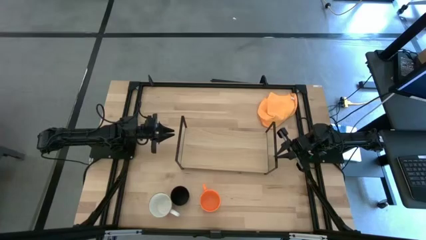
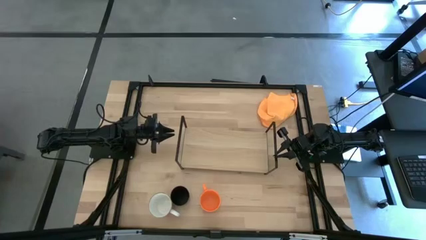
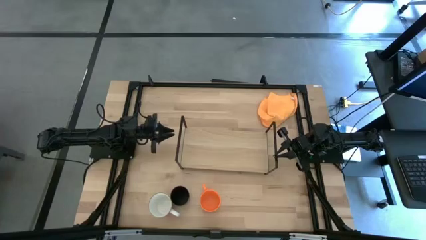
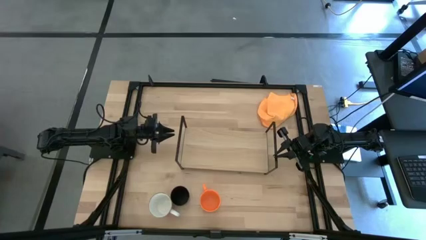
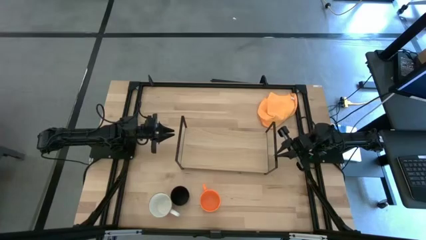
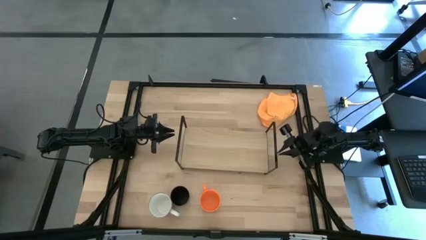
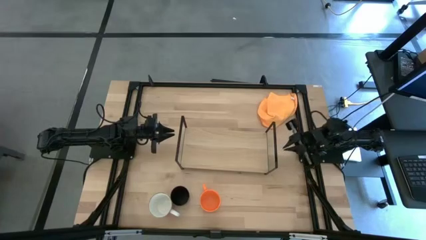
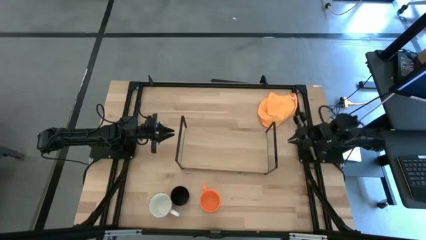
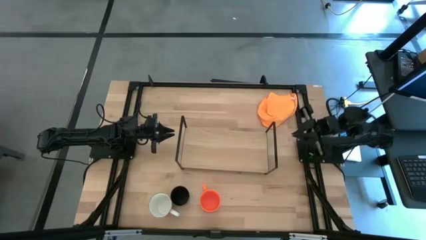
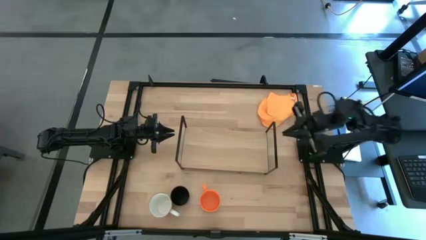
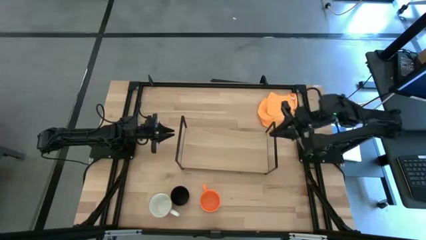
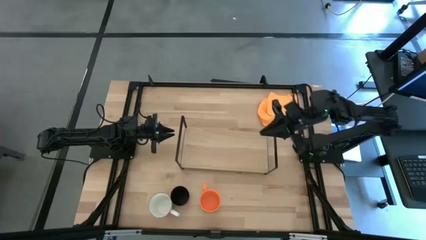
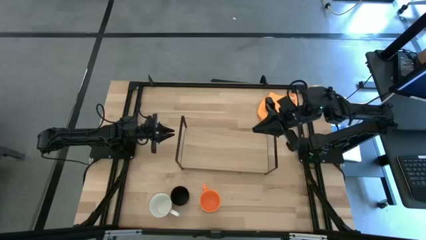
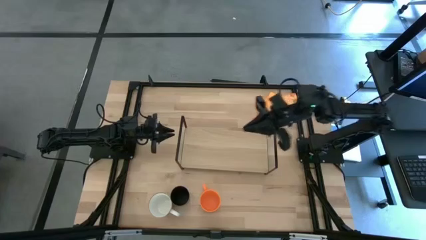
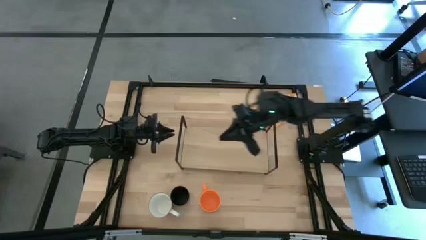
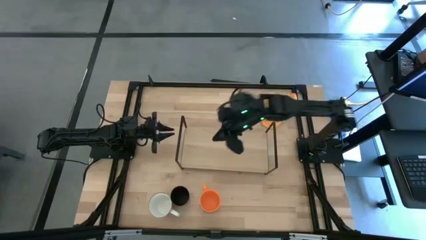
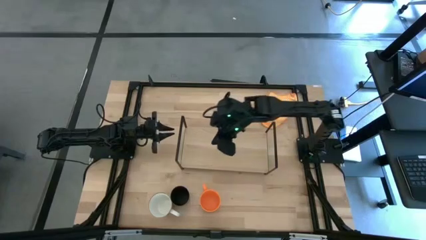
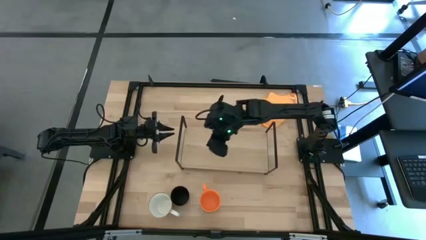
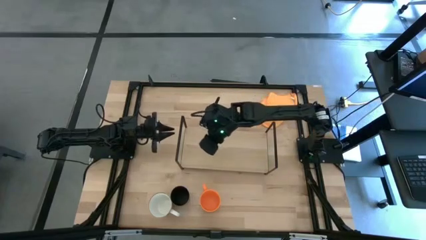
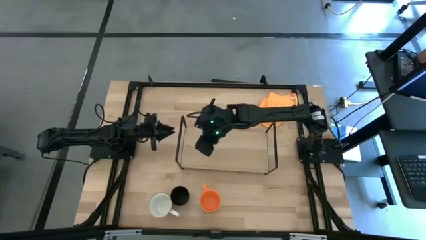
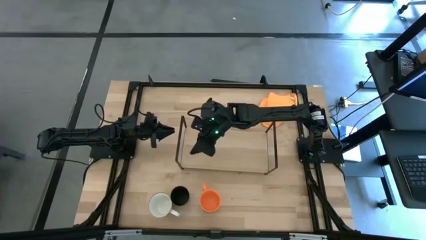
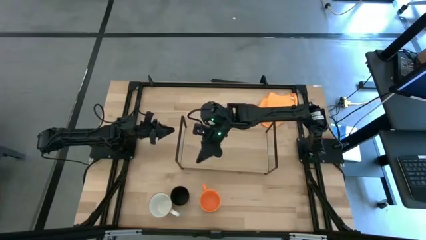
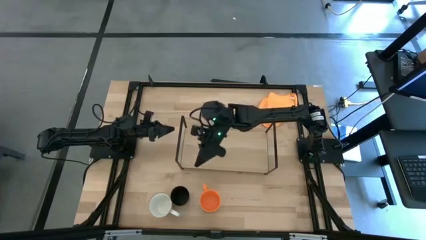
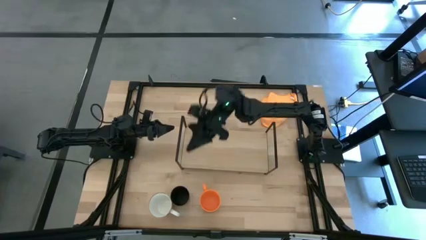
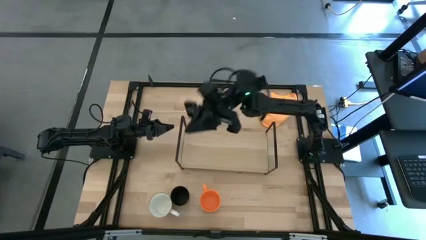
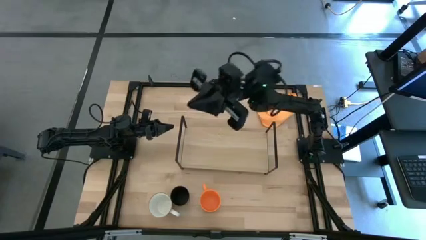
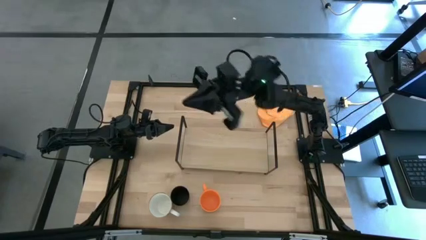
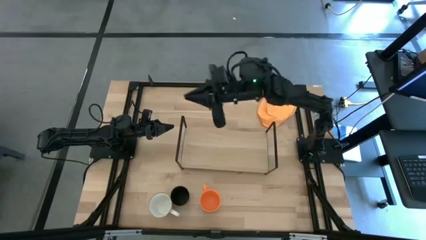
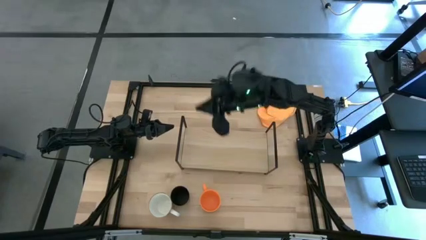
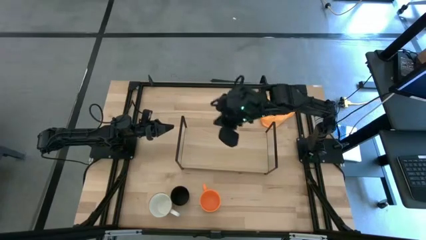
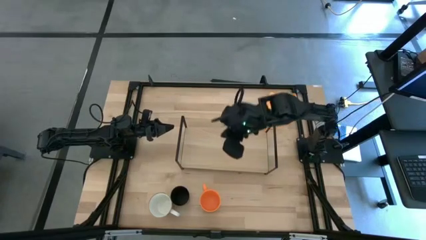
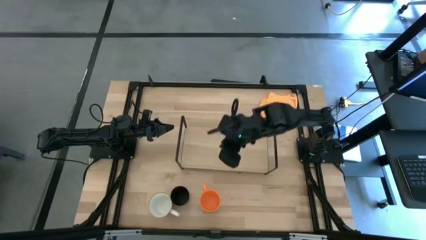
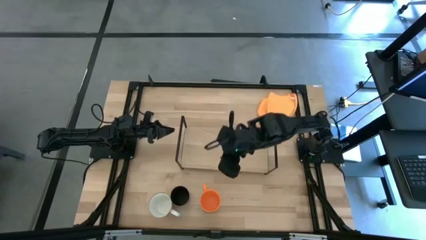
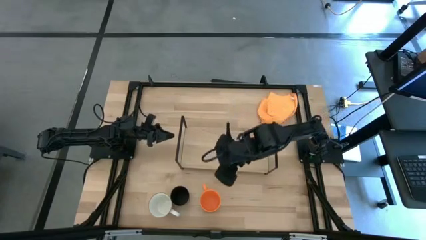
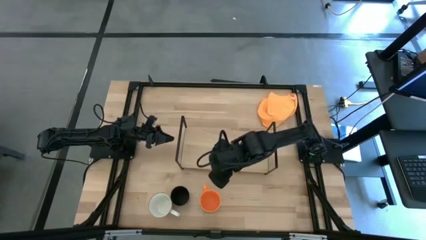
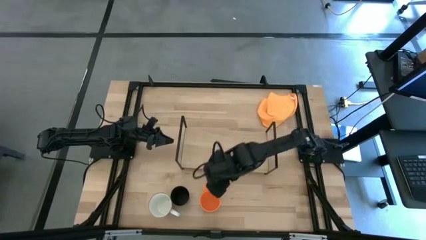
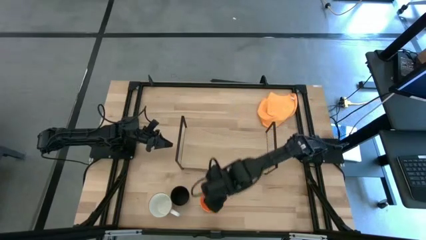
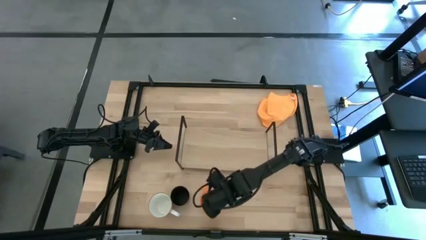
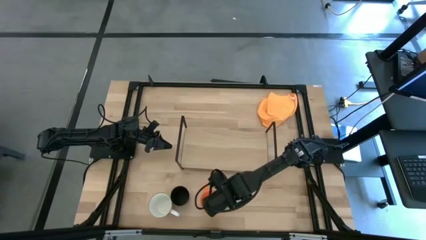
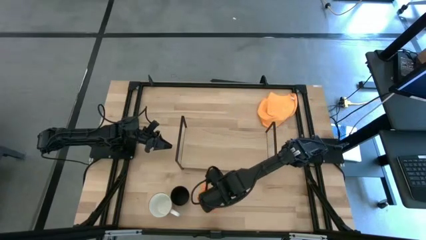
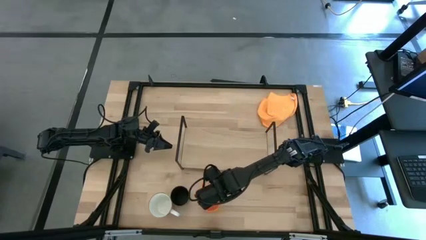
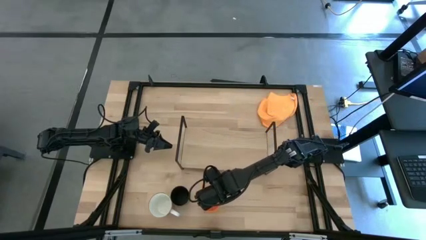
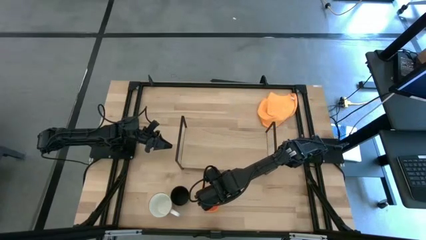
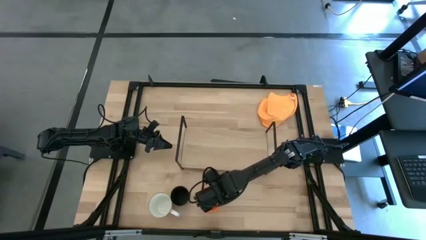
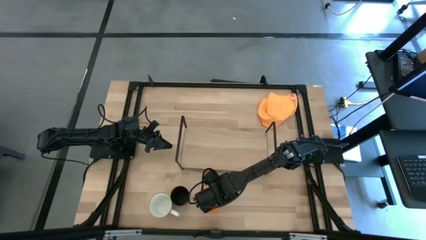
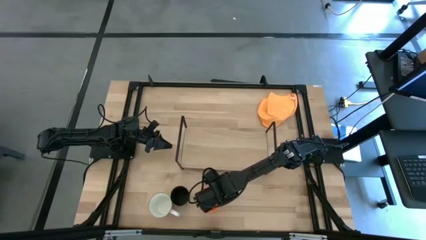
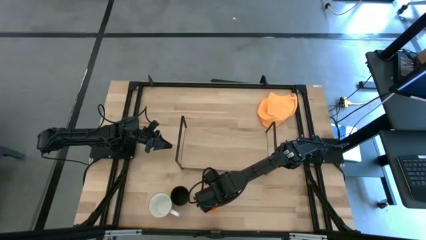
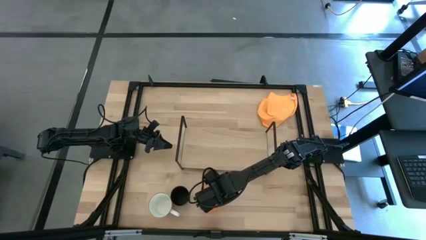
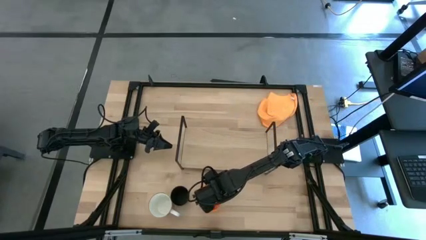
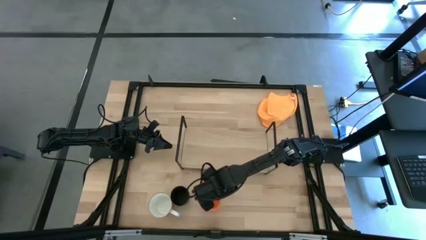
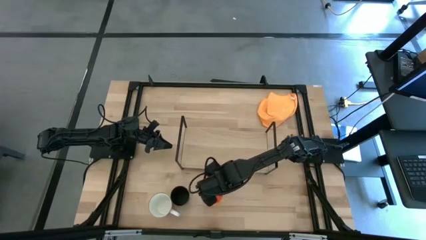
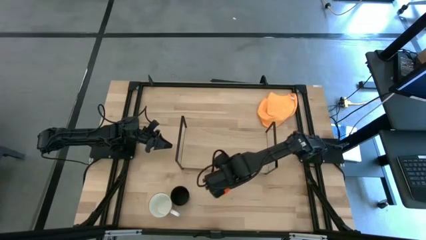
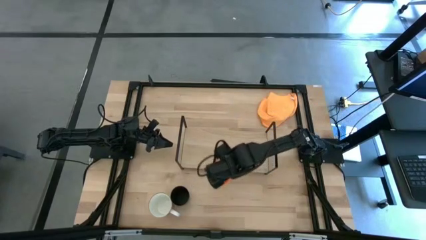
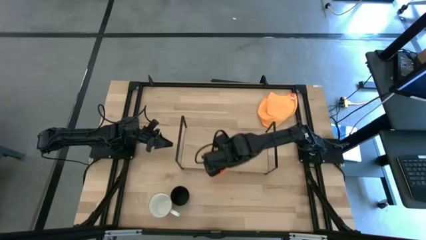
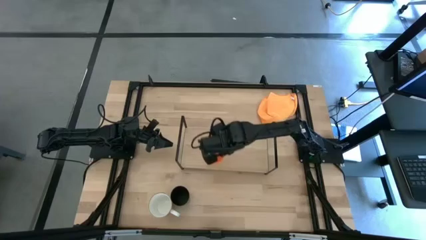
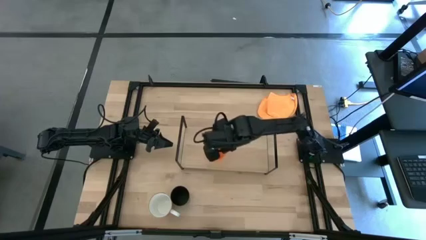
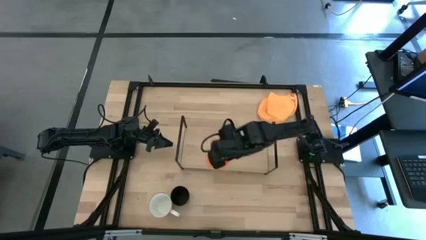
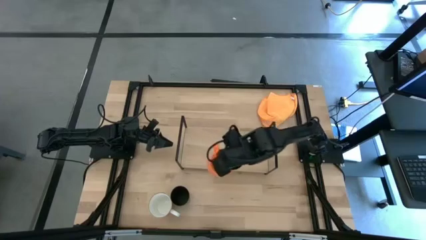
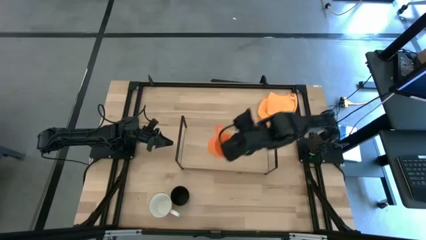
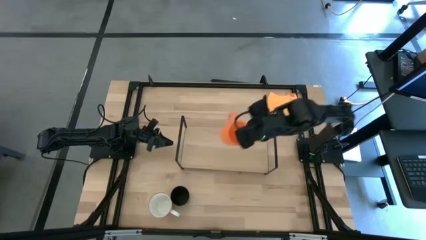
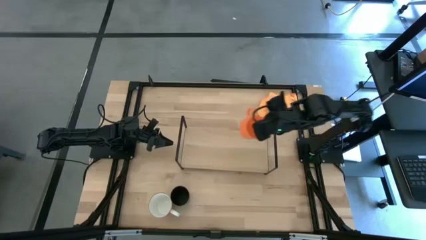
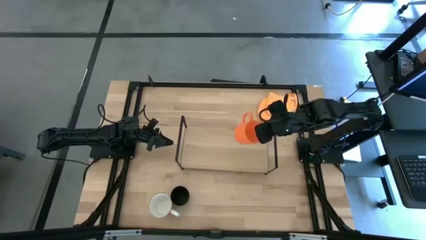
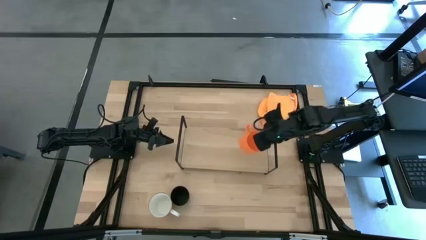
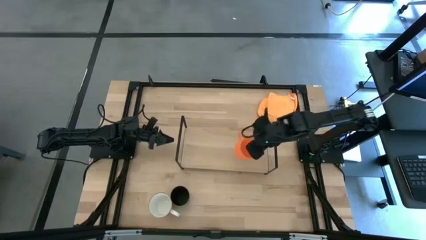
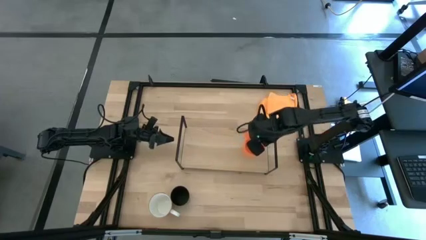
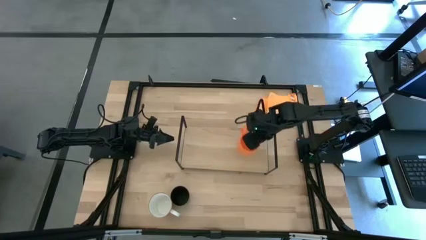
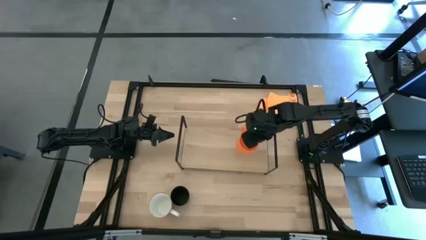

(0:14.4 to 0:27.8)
Task: Stack small to large cups/mugs on shelf
Put the orange mug on the shelf

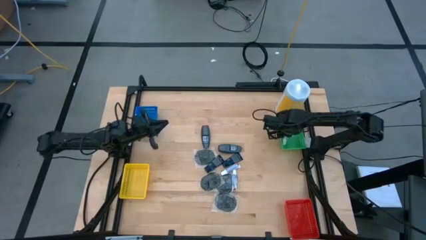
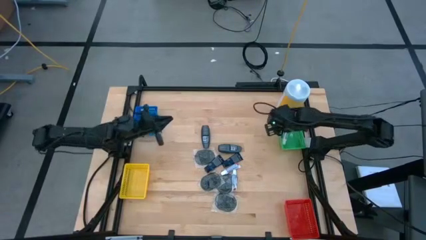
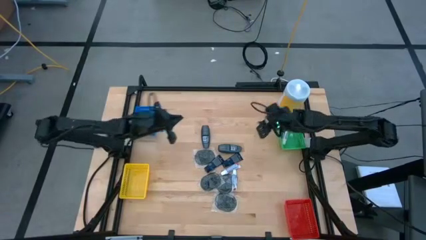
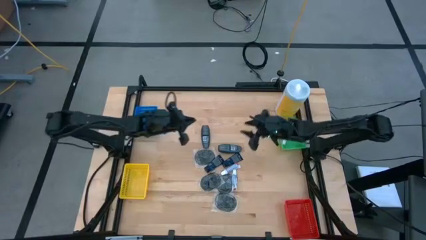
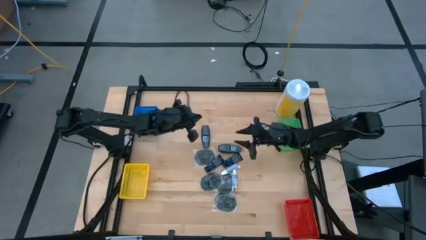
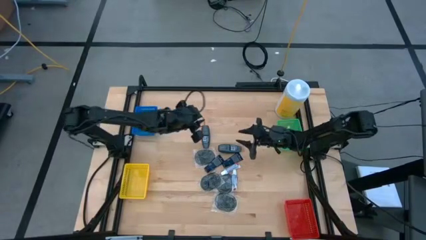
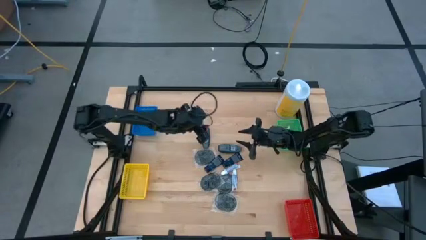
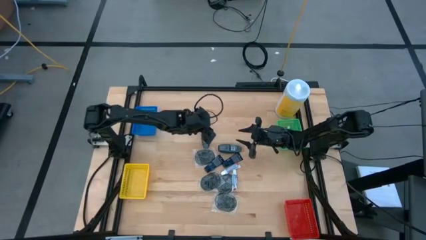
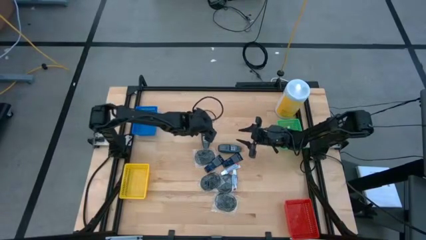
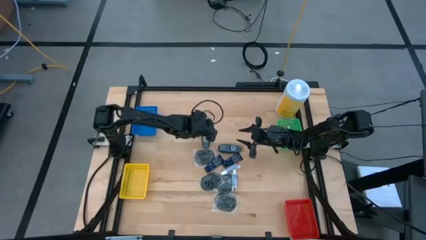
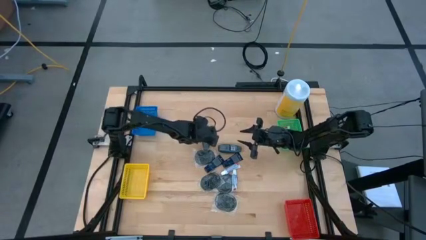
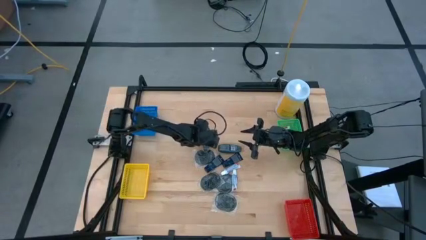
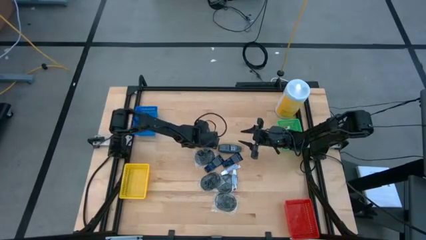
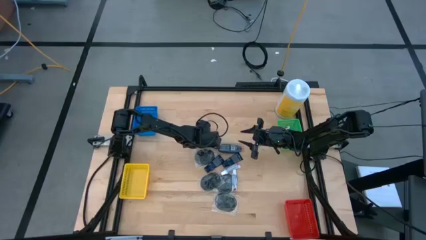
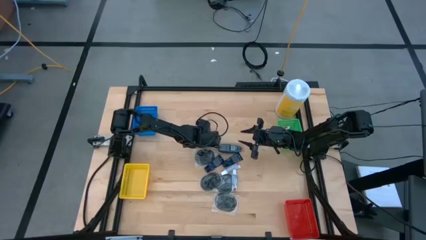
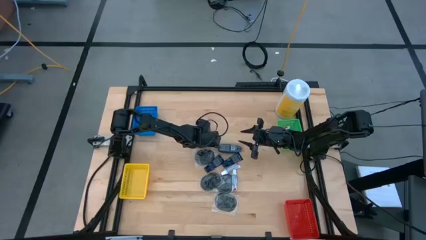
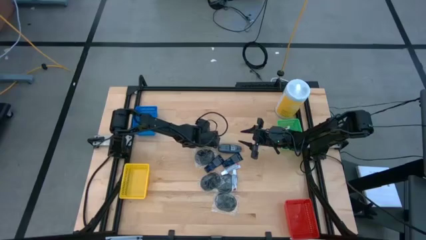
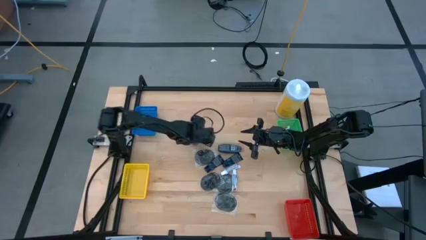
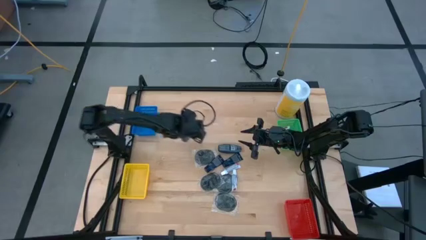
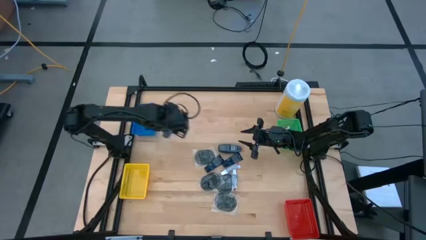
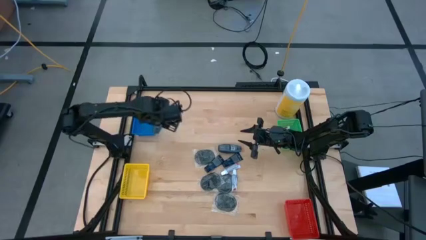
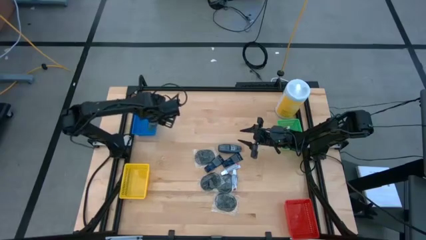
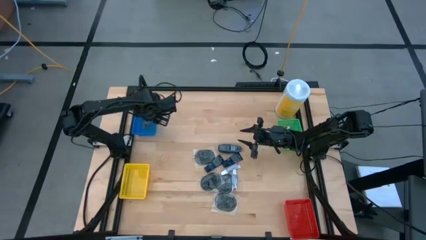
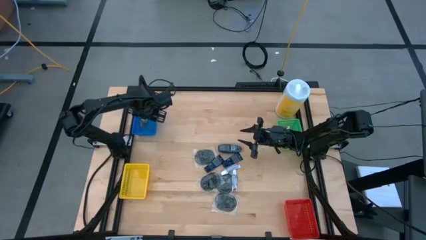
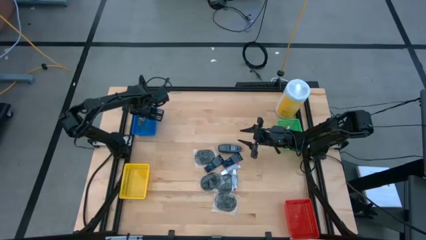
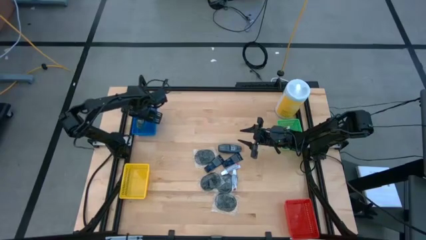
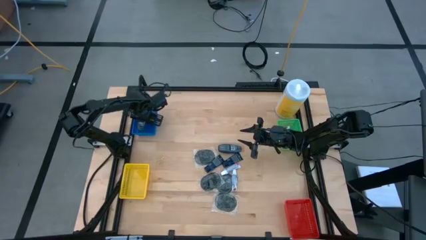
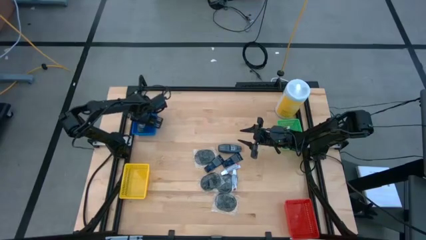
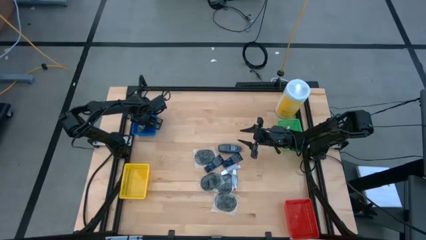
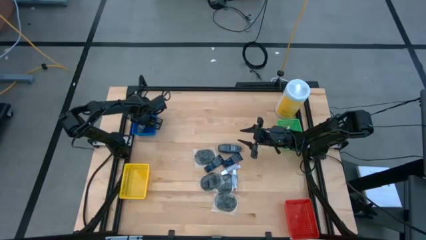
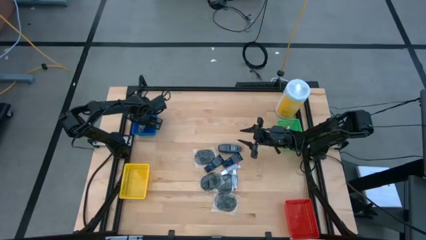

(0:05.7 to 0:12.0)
Task: Pick & Place Travel size toiletries
Put the gray deodorant into the blue bin
